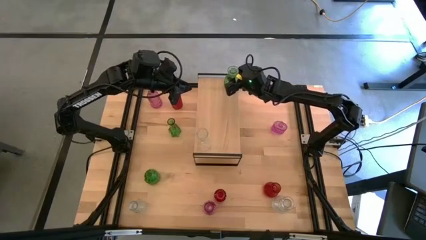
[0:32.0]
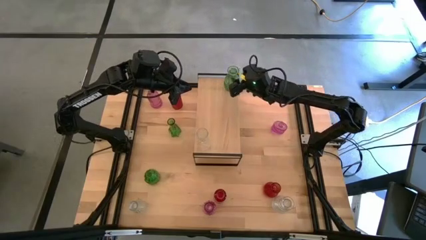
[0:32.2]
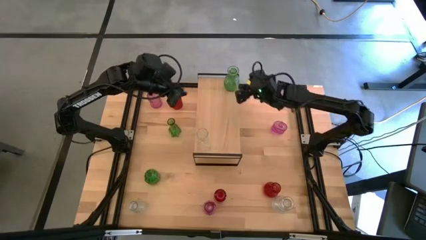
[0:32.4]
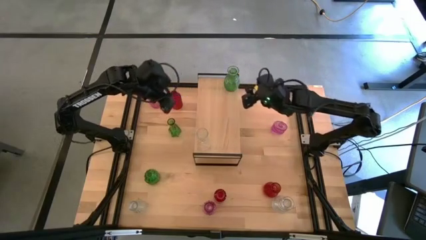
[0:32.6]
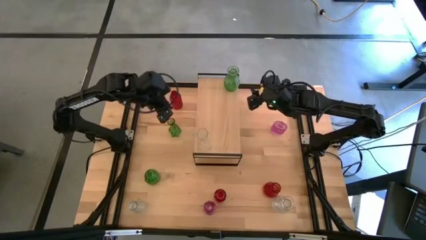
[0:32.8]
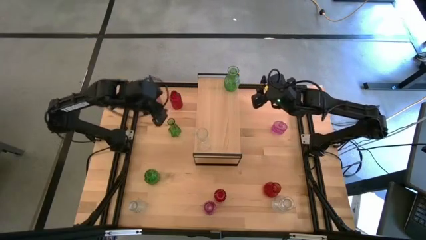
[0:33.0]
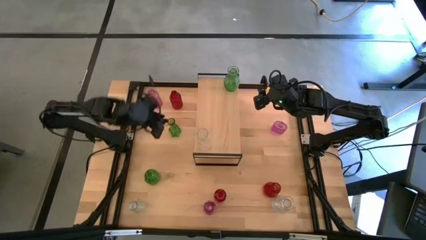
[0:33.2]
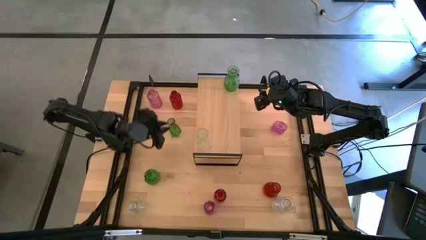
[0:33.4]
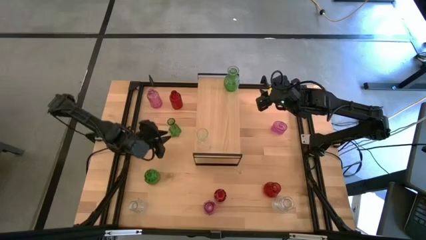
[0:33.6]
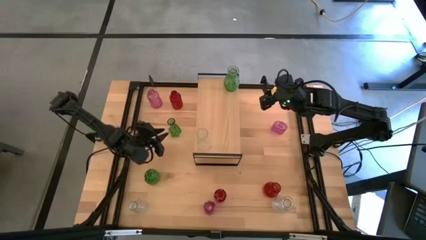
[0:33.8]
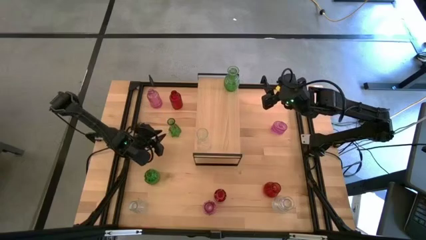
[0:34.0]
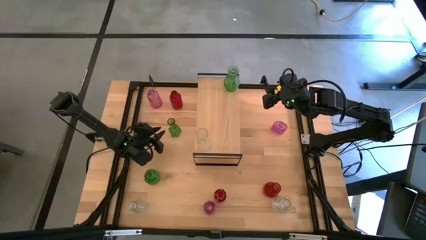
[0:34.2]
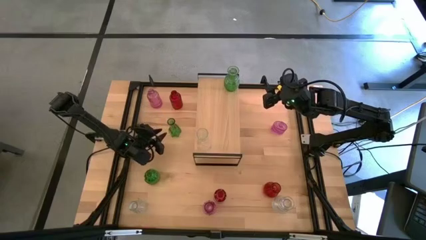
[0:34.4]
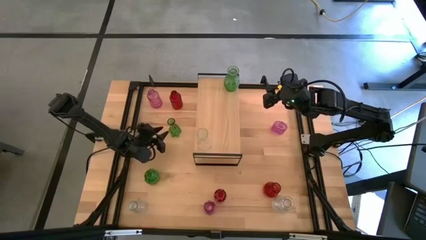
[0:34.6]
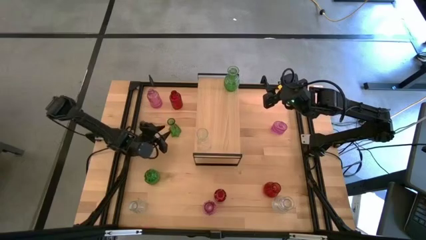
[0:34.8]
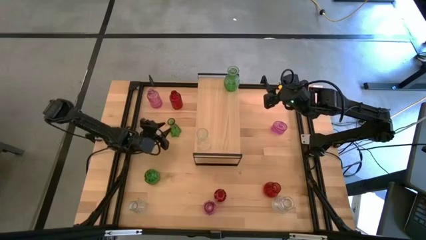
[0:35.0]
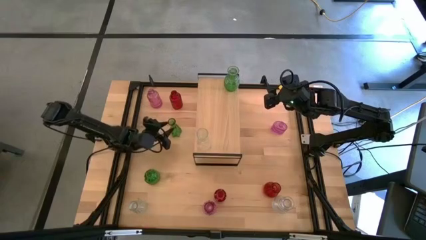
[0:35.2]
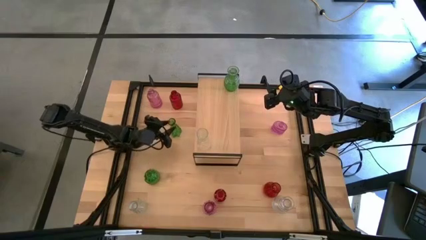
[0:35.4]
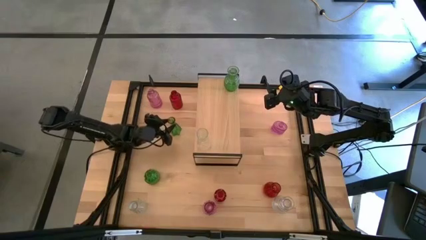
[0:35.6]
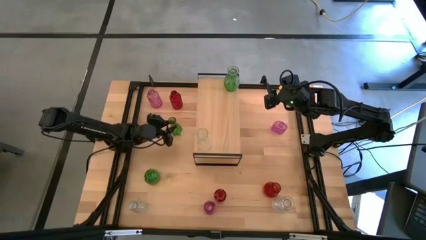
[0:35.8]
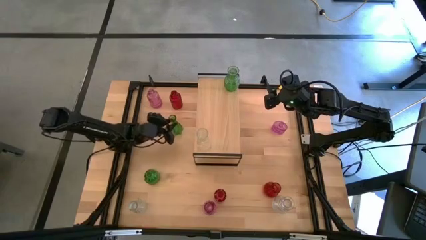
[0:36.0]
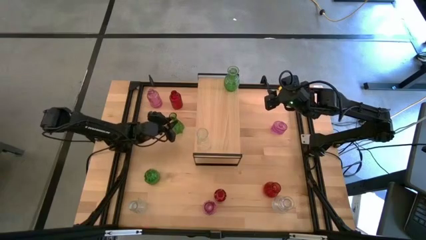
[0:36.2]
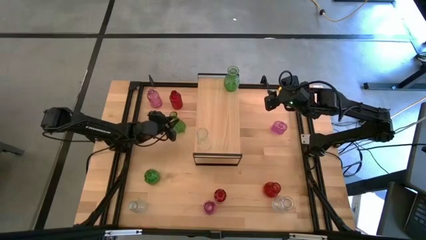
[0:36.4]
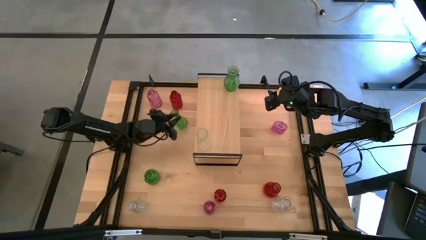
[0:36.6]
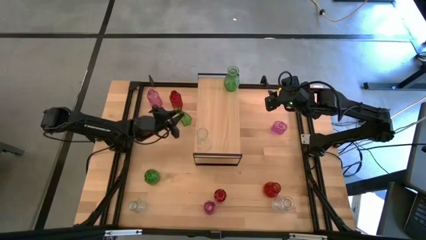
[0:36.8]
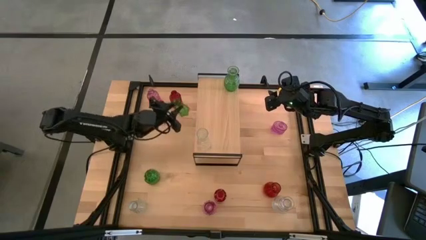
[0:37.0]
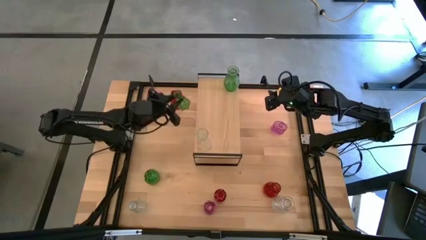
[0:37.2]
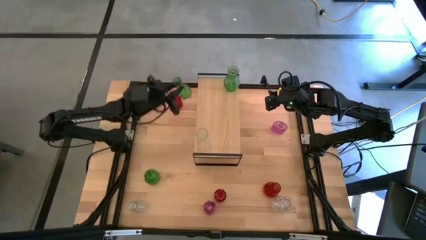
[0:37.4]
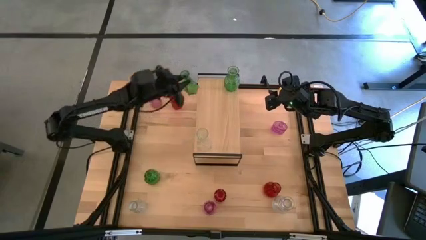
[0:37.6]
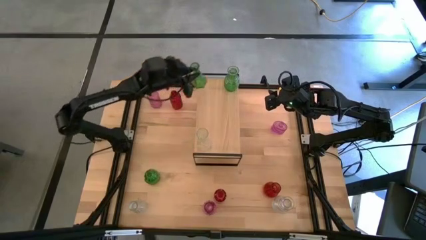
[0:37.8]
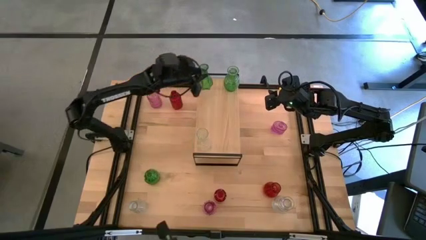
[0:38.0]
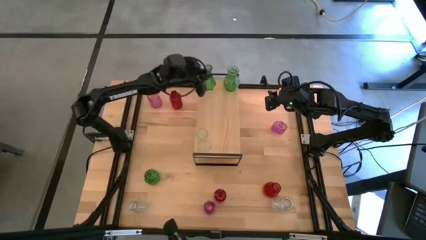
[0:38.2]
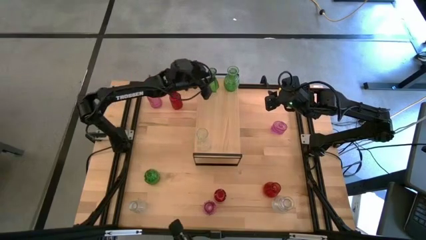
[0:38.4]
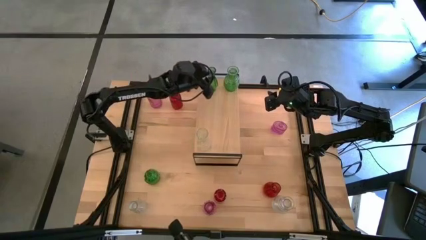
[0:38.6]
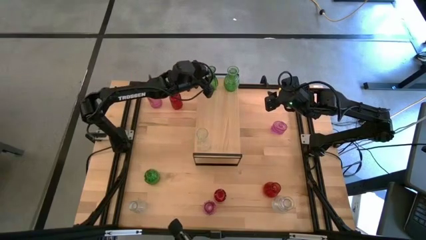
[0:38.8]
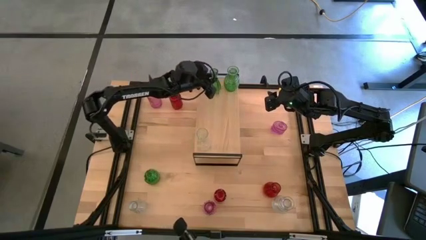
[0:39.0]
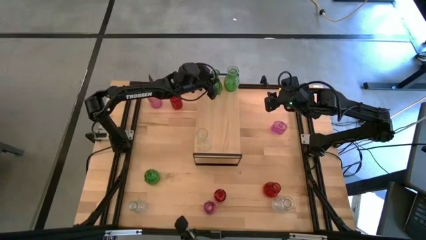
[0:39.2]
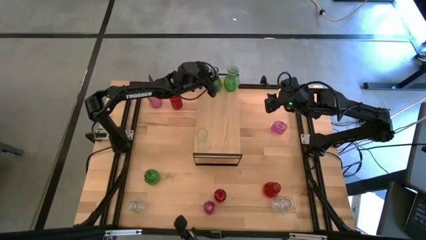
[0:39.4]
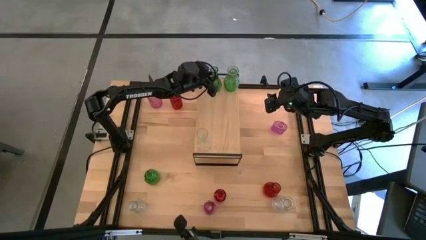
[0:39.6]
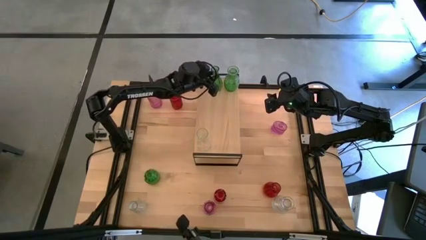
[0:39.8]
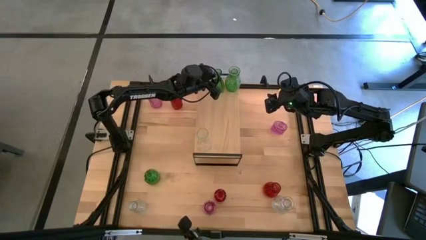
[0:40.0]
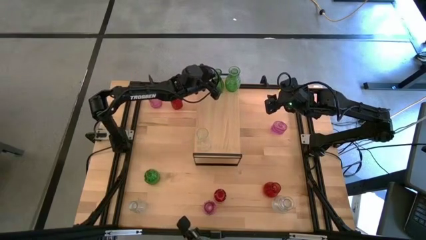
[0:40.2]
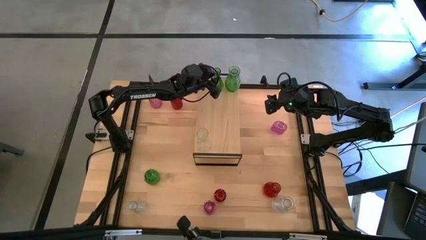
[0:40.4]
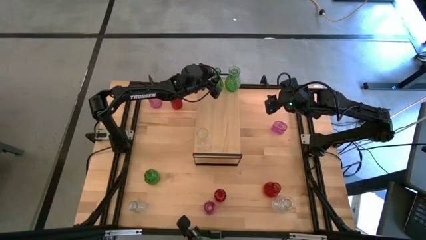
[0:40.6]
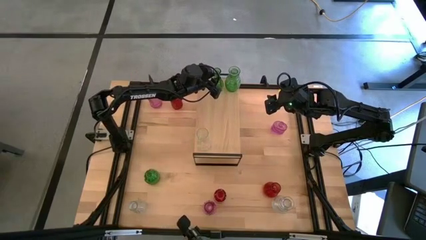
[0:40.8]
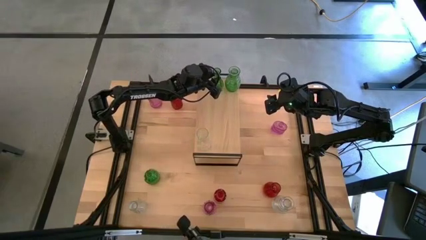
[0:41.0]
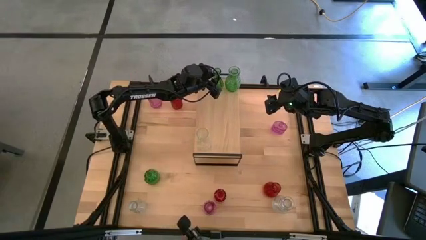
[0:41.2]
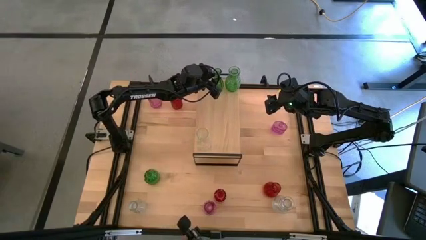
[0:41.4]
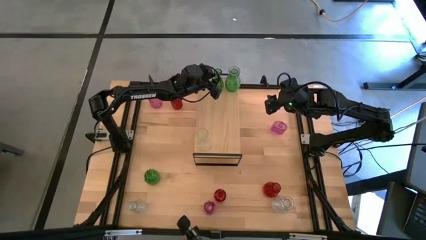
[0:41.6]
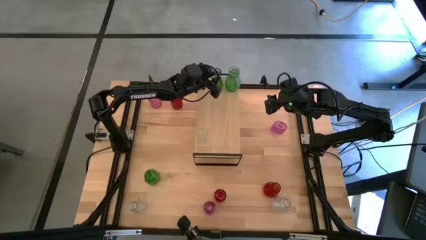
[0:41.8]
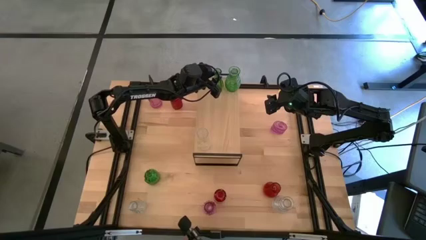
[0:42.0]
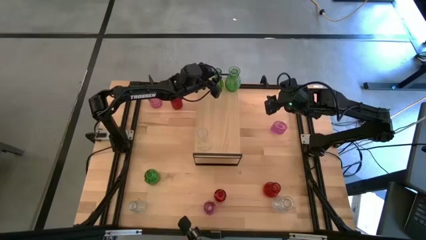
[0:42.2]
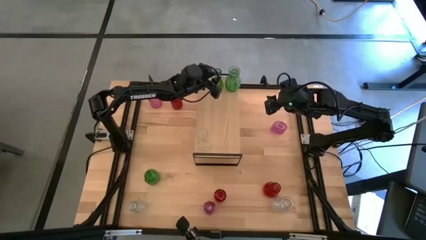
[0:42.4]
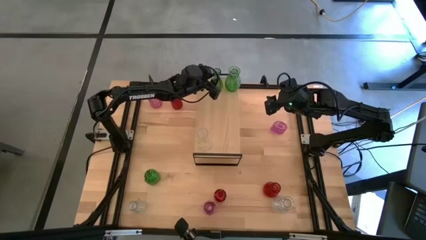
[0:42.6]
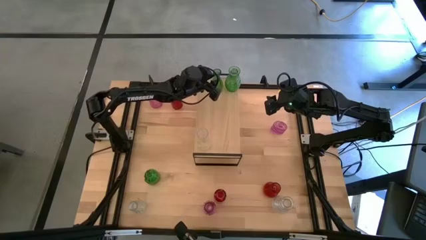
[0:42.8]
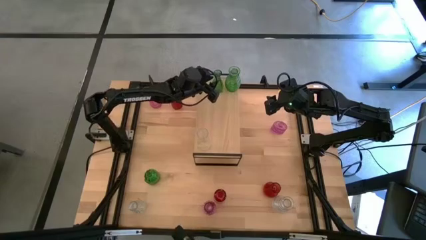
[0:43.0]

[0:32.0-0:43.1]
Task: sort vases onto shelf
Put the top green vase on the shelf

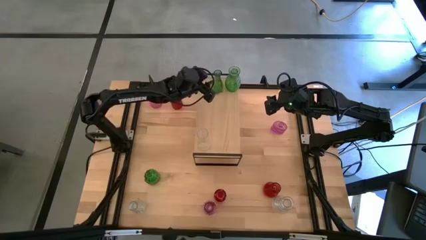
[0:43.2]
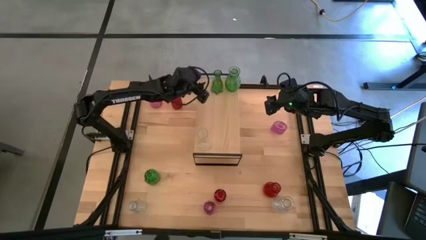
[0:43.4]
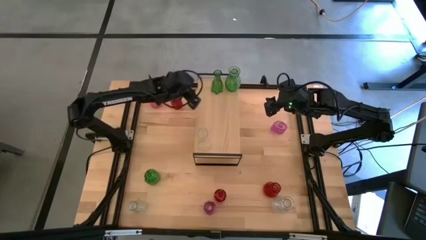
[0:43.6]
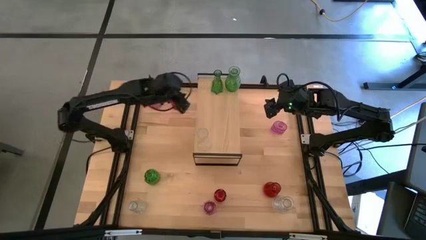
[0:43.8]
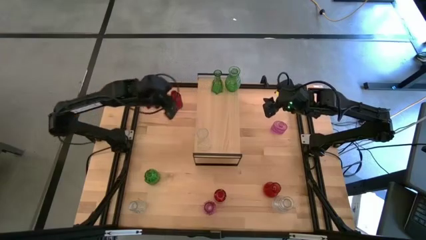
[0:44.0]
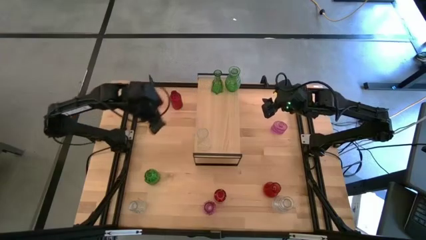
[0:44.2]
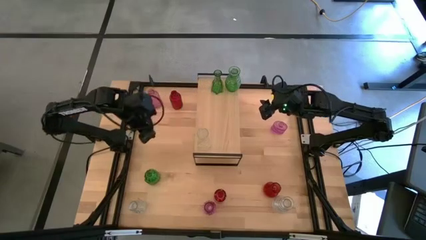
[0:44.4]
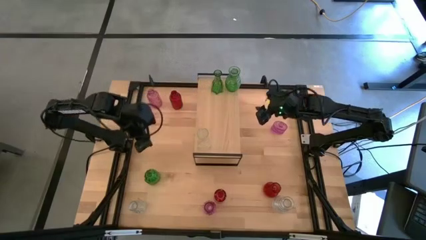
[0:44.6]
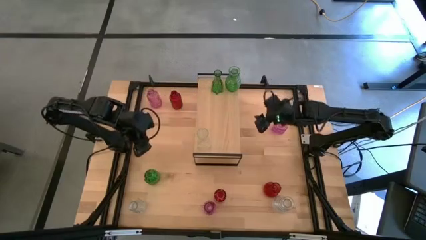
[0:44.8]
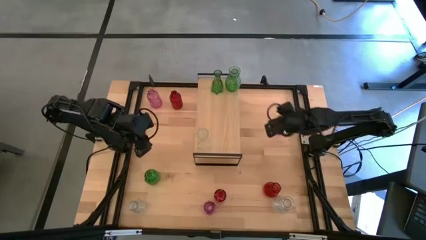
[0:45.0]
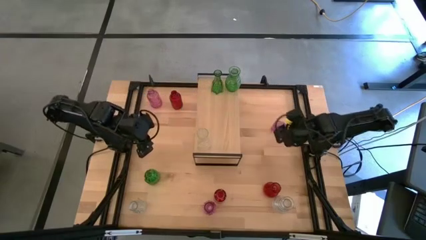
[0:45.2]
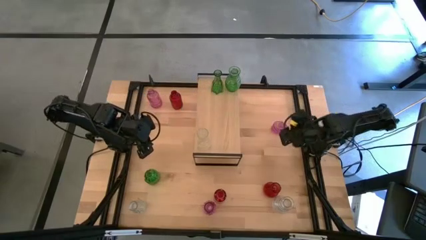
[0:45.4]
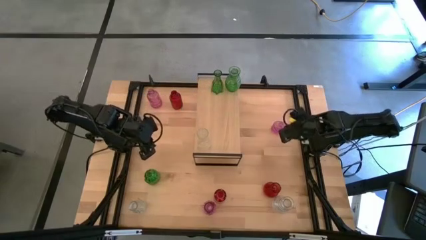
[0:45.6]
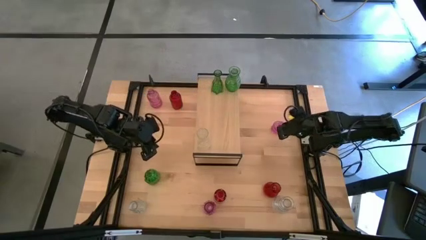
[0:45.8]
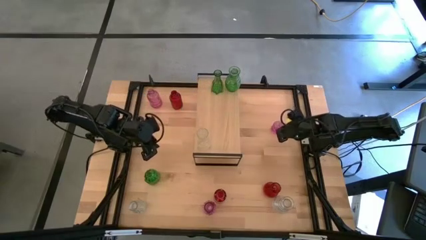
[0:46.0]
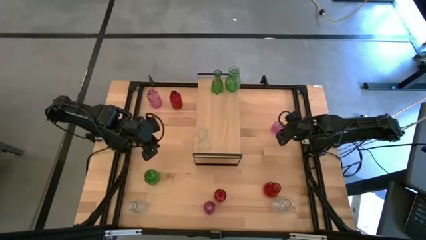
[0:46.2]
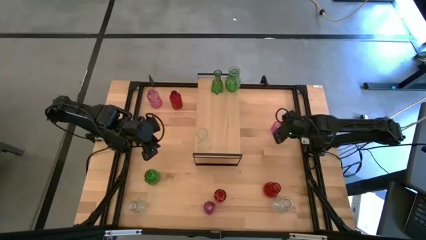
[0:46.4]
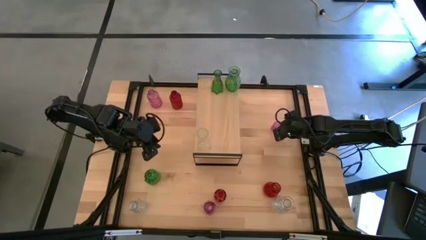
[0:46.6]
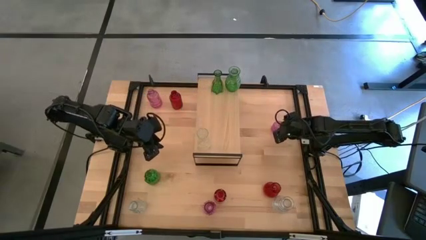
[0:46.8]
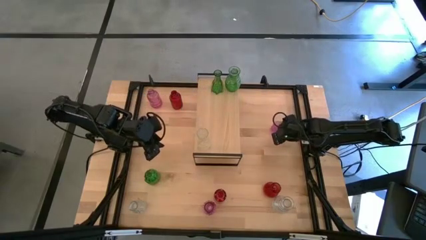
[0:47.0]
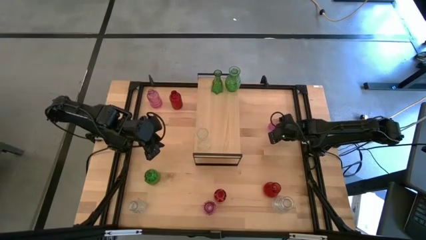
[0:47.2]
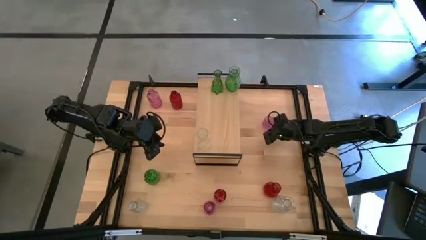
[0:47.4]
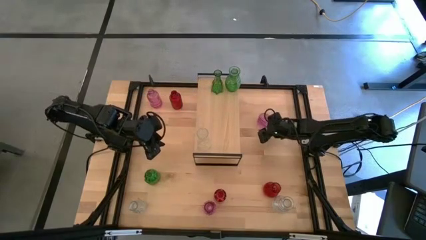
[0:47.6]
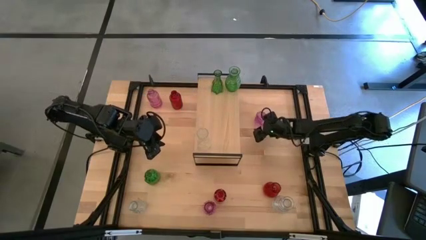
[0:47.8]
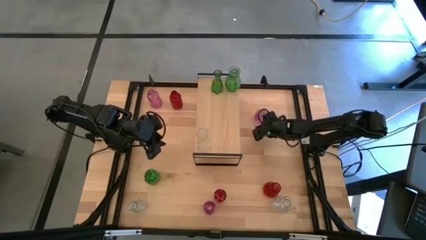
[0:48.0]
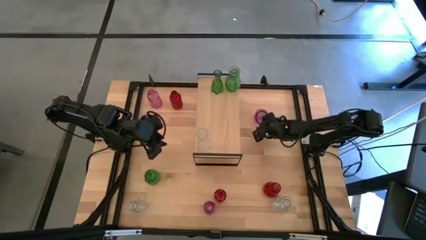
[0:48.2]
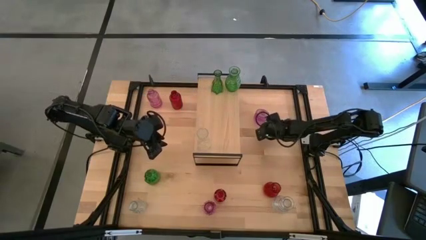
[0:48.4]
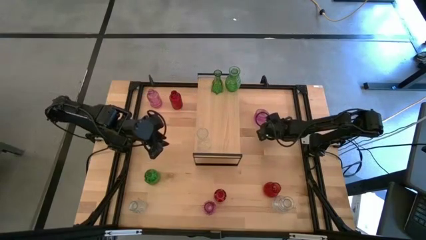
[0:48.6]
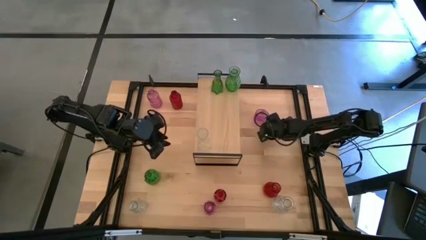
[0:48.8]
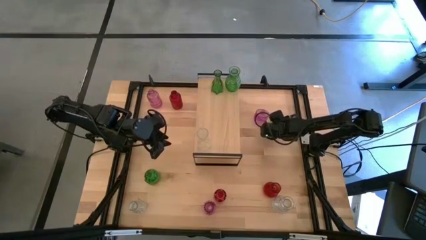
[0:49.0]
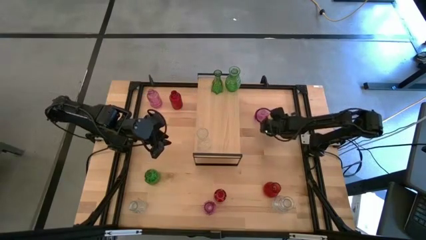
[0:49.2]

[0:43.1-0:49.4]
Put the top right pink vase on the shelf
